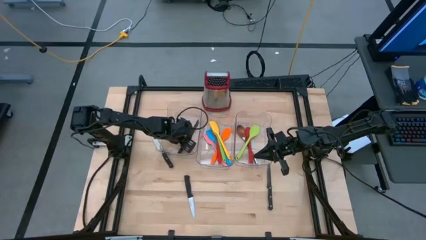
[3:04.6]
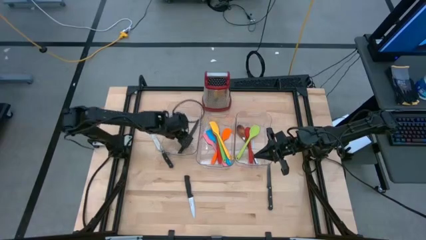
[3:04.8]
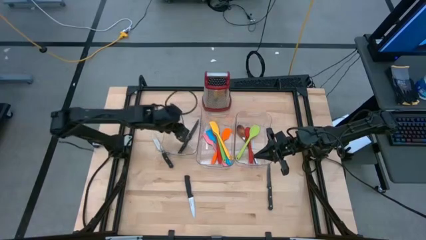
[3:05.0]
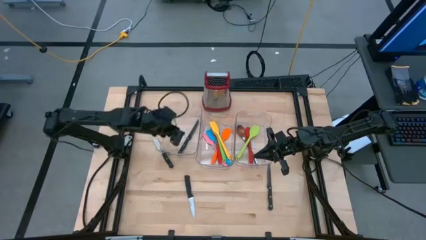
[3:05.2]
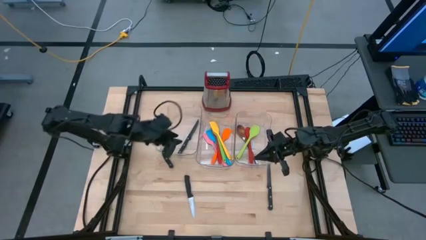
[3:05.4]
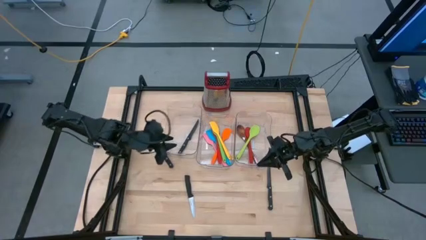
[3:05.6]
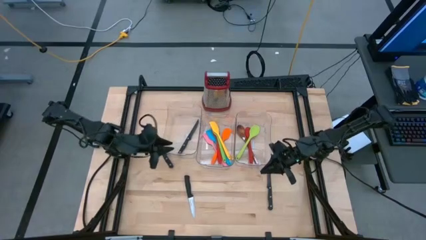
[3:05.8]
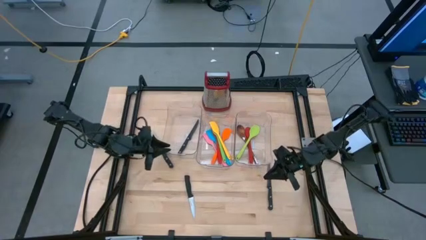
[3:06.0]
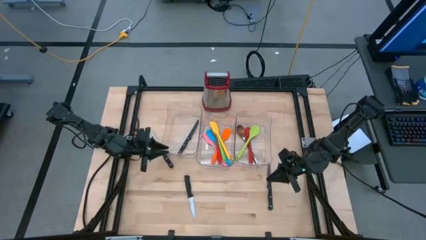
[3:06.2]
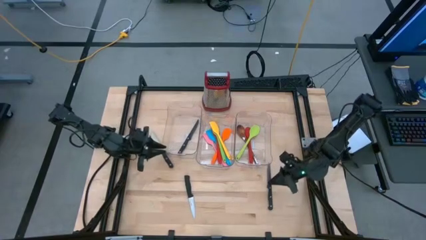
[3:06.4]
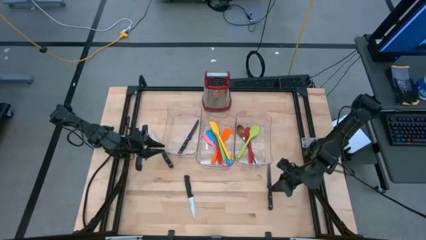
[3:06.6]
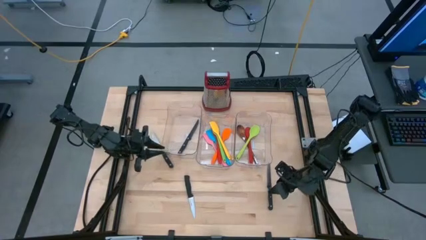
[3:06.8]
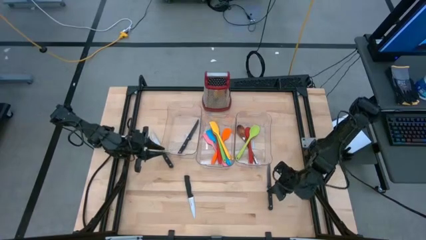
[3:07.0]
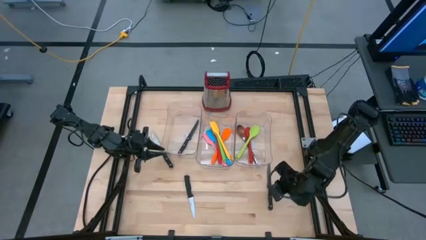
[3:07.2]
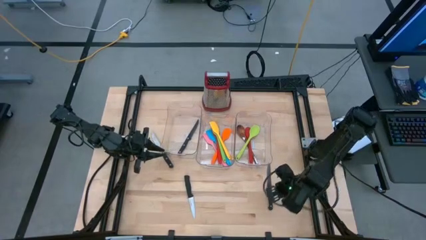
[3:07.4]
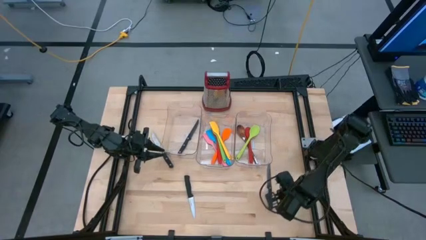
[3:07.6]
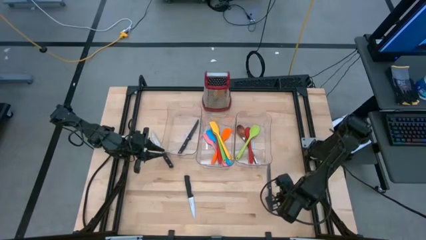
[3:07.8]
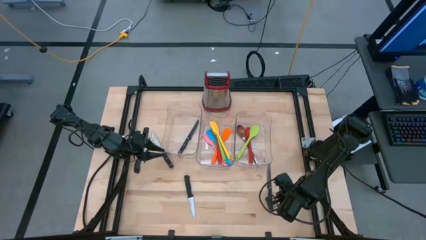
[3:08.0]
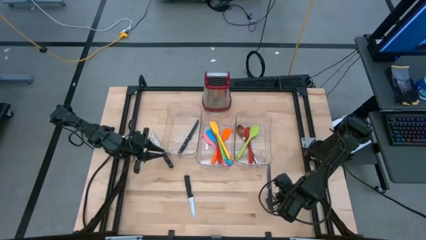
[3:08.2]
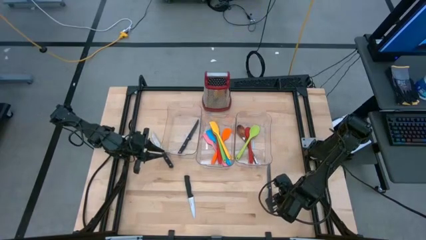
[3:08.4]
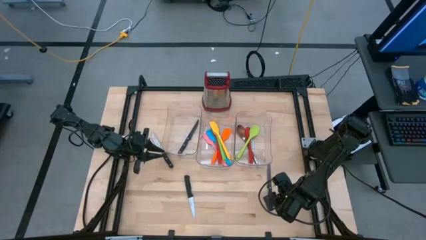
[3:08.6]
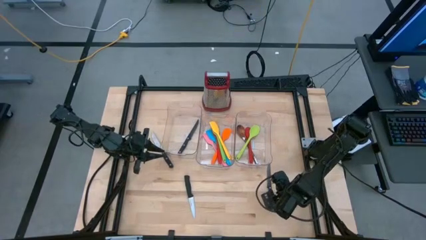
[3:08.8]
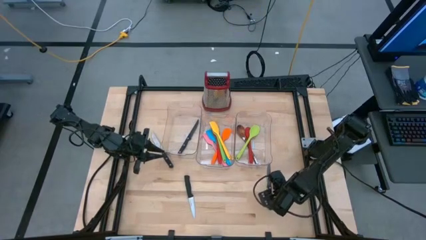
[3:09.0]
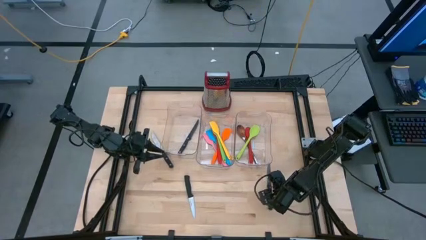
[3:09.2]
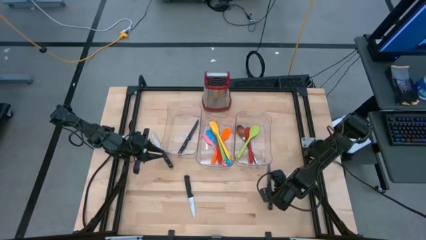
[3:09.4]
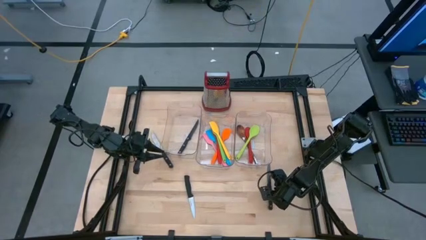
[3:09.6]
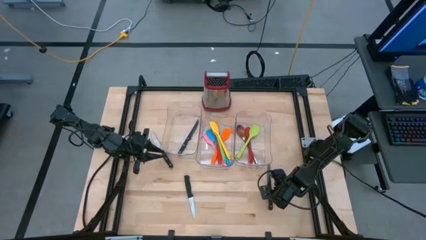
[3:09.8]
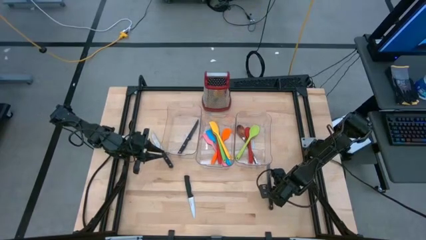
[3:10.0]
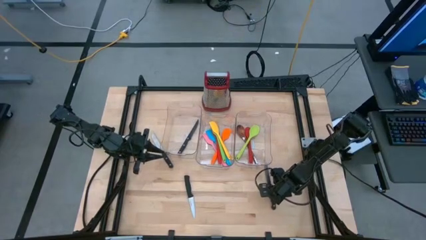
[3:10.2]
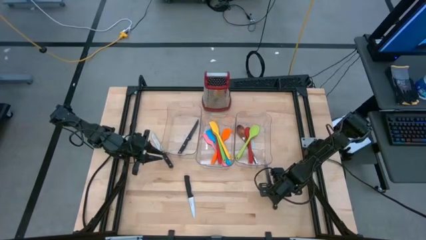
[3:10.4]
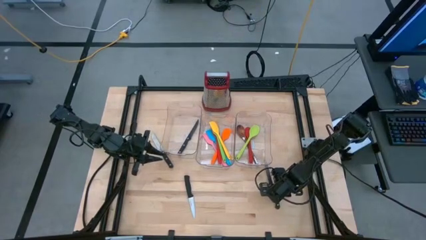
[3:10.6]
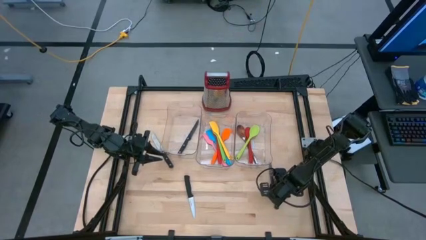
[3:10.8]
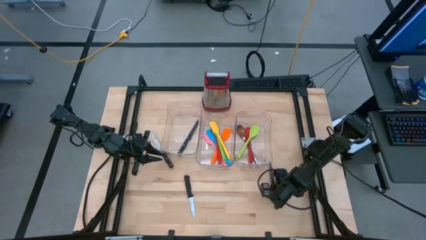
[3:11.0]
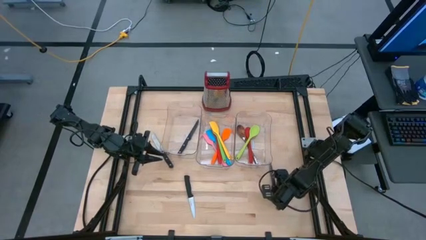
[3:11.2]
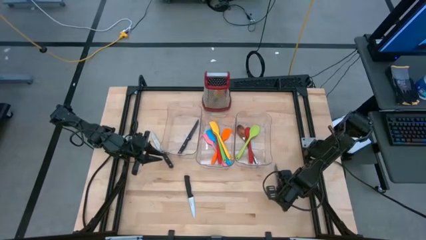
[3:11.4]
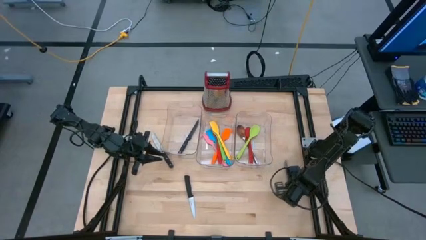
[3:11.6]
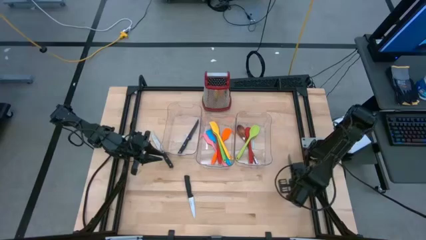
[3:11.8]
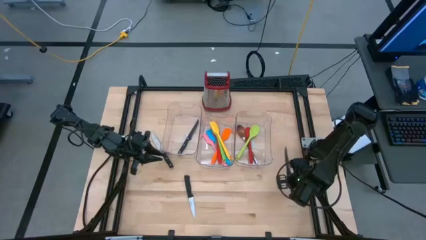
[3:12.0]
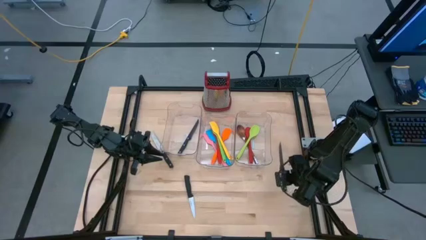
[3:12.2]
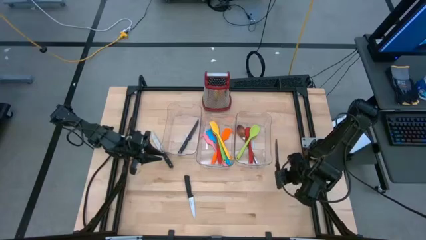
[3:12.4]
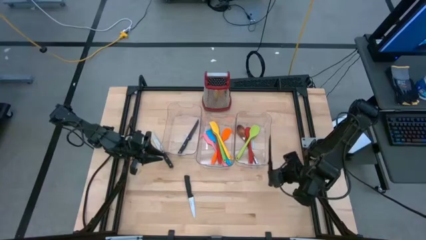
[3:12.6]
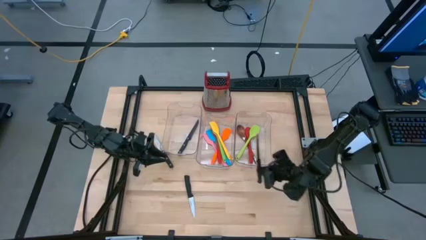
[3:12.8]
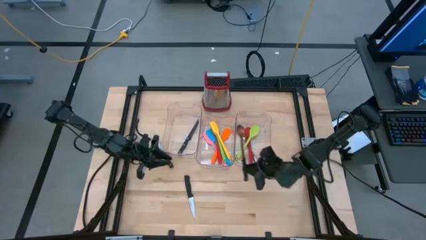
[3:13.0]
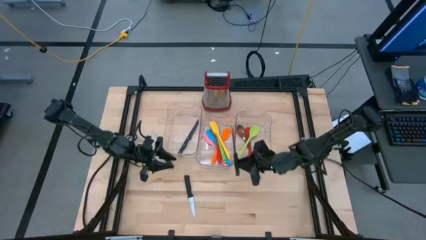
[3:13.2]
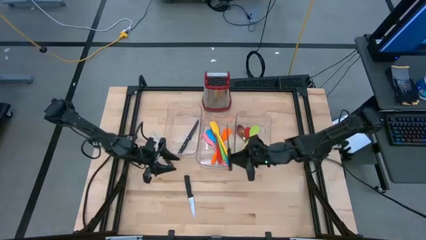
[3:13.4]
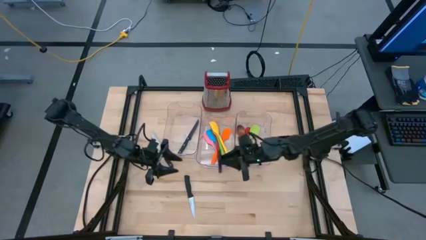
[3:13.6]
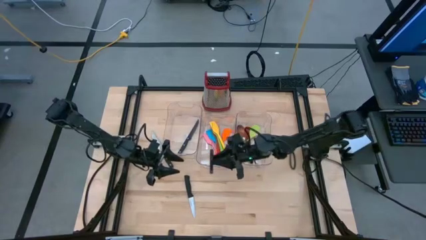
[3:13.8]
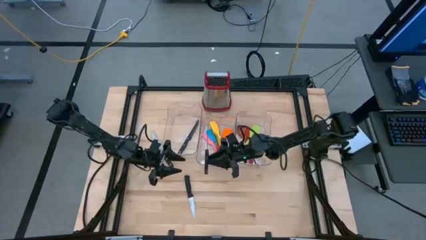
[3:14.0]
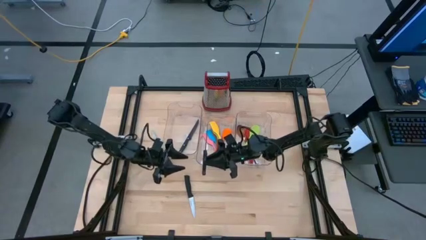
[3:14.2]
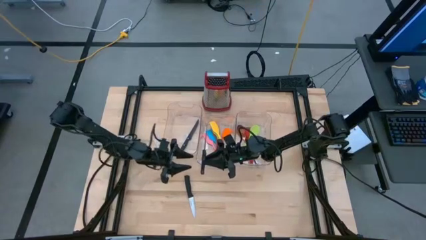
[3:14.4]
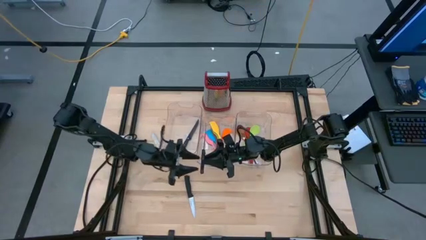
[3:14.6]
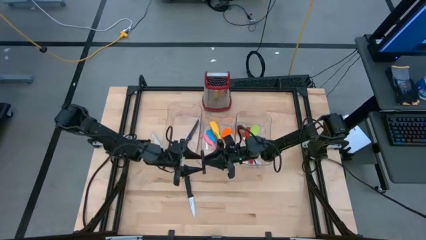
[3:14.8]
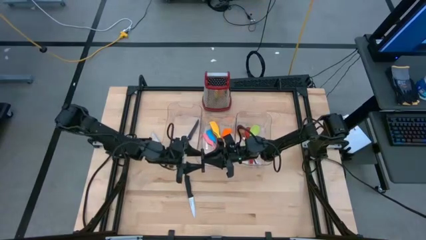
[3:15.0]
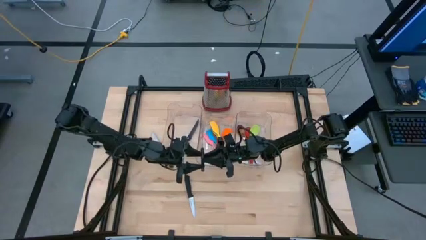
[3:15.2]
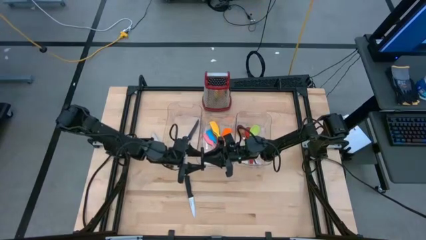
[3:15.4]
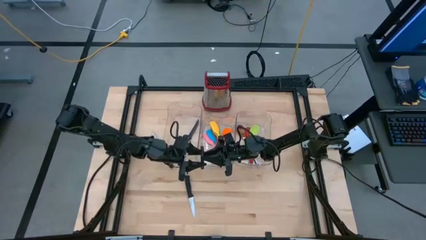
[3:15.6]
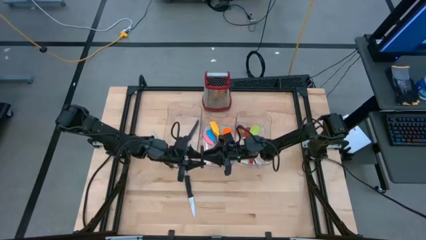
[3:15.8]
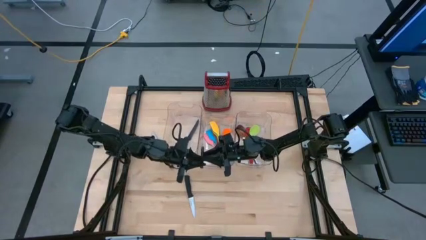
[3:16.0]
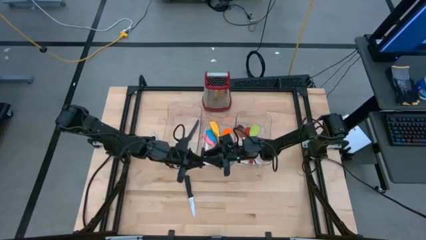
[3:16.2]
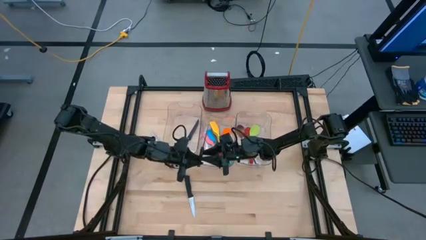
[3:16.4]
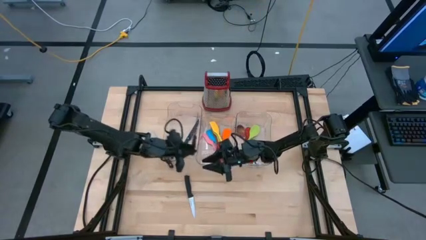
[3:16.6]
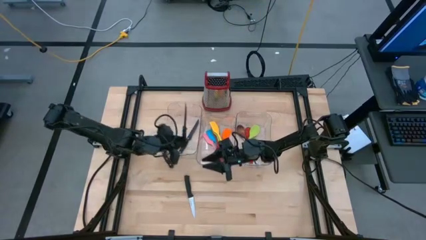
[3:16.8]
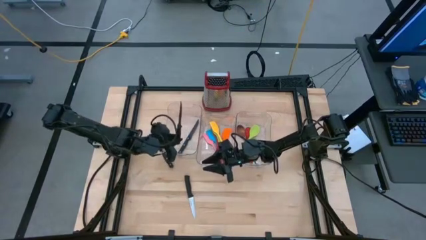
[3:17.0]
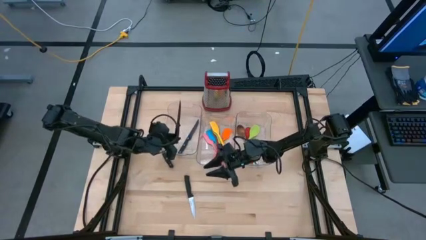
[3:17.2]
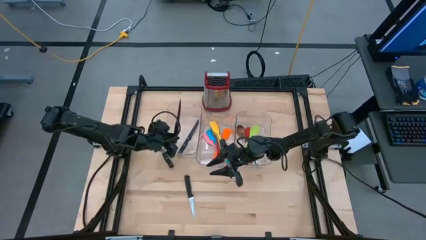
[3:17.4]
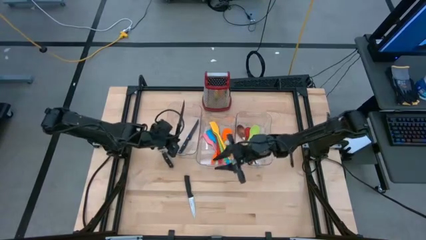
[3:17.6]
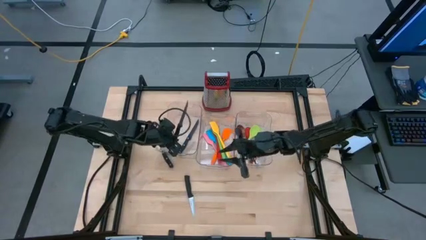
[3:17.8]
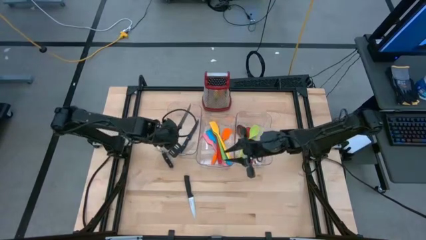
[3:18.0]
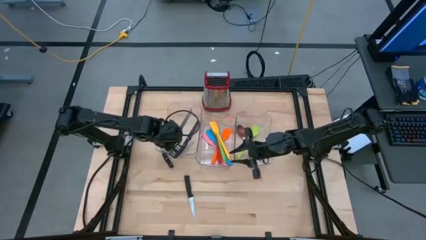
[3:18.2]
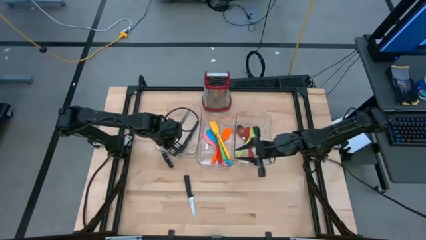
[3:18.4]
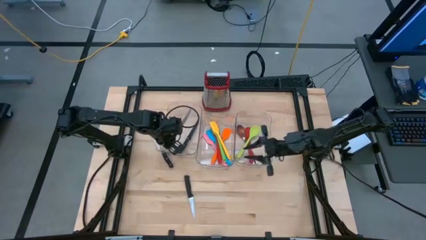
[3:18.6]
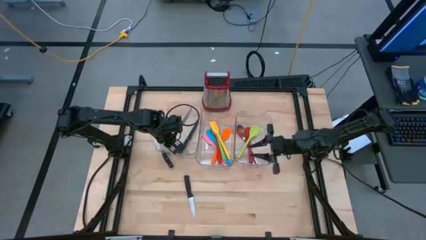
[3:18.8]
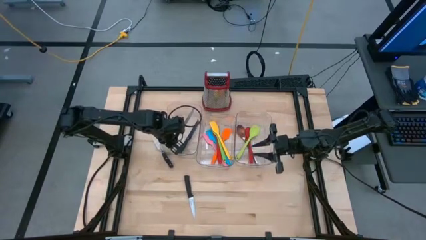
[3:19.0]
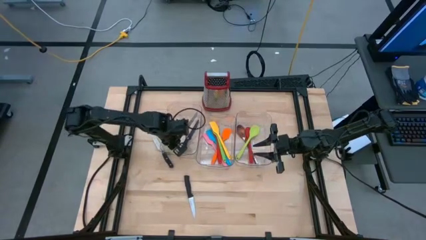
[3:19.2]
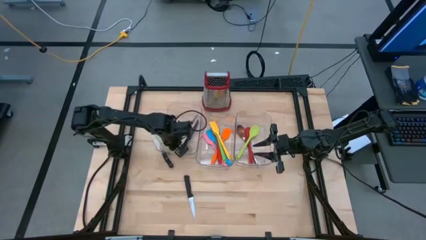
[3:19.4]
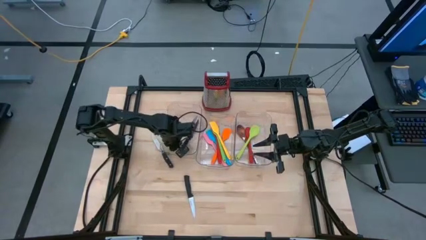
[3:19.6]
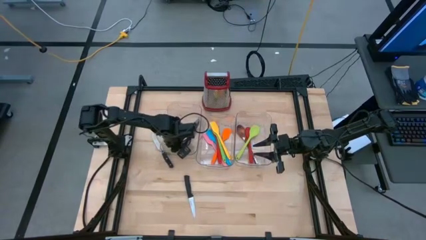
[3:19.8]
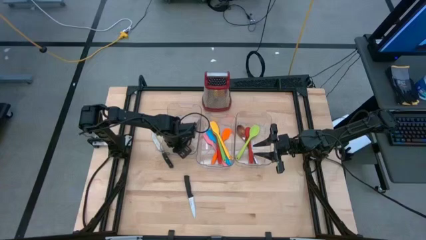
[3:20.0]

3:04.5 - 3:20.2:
Task: Pick & Place Kitchen Items
Put the black knife into the left transparent bin
